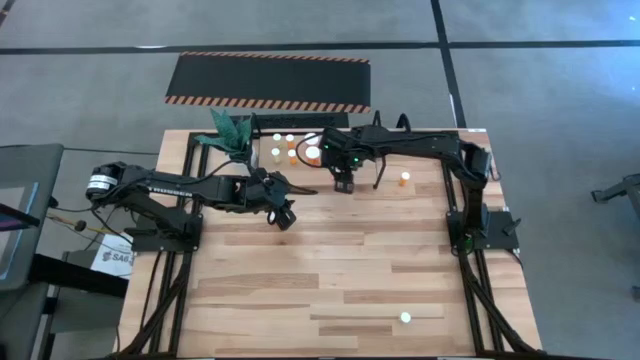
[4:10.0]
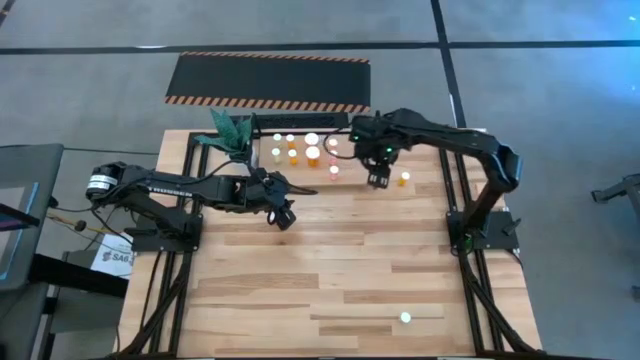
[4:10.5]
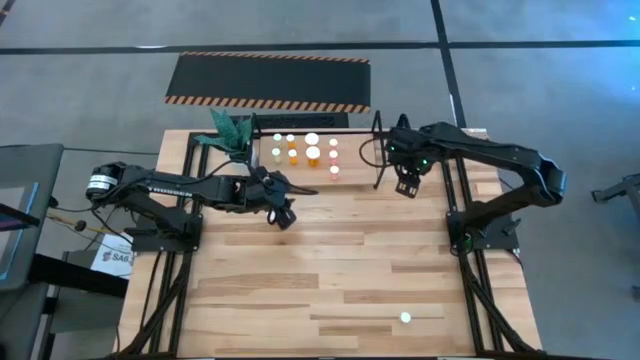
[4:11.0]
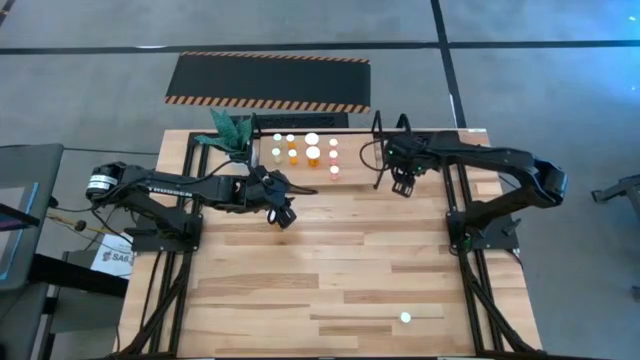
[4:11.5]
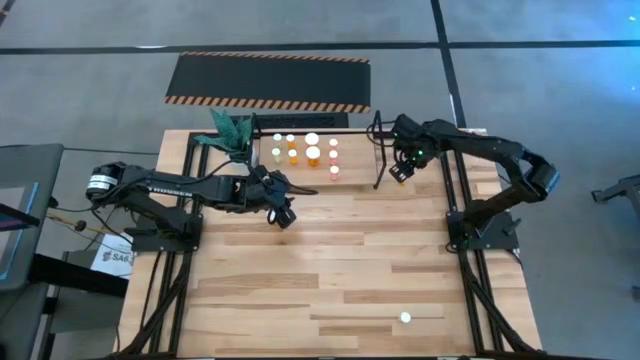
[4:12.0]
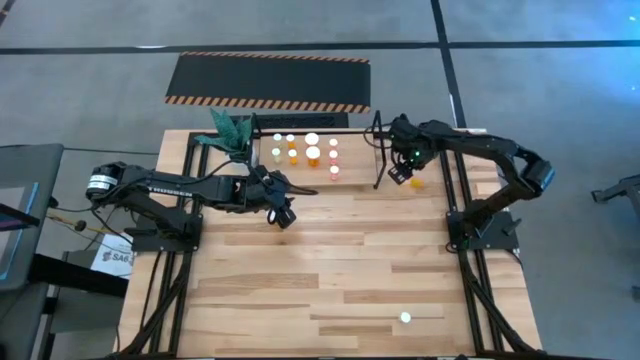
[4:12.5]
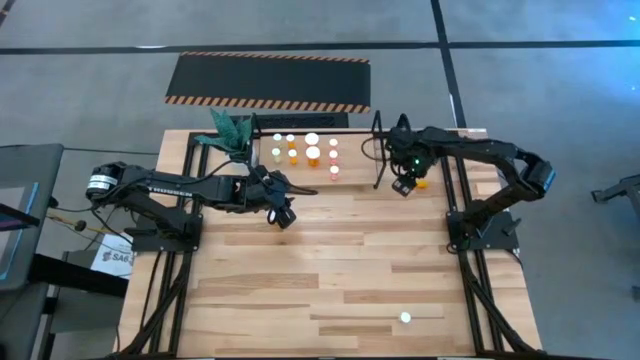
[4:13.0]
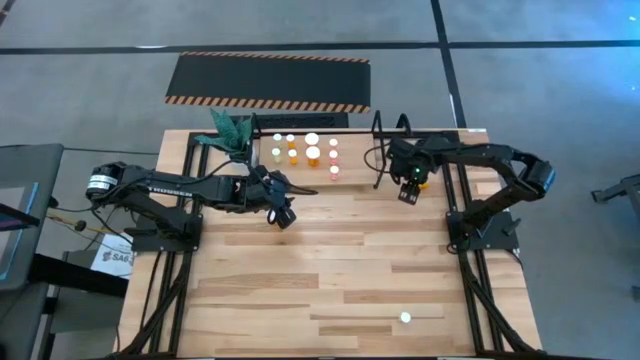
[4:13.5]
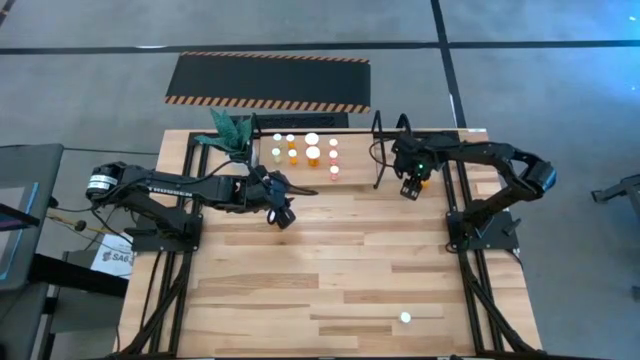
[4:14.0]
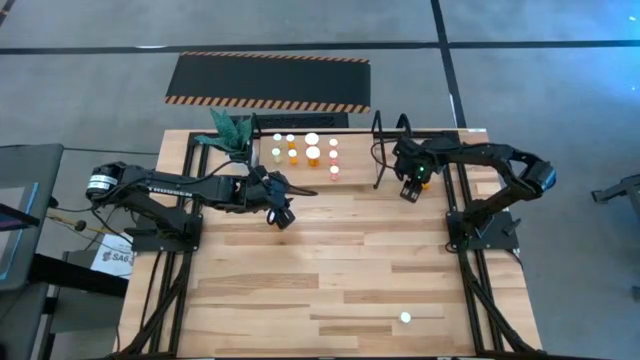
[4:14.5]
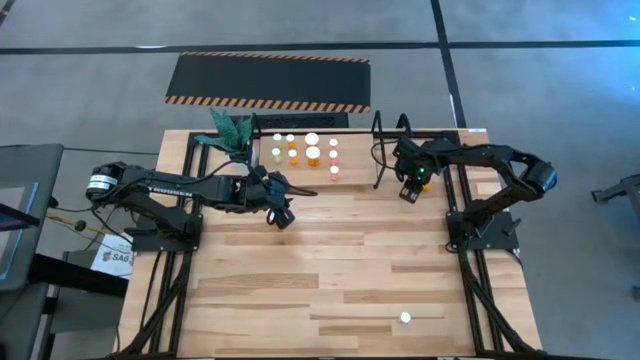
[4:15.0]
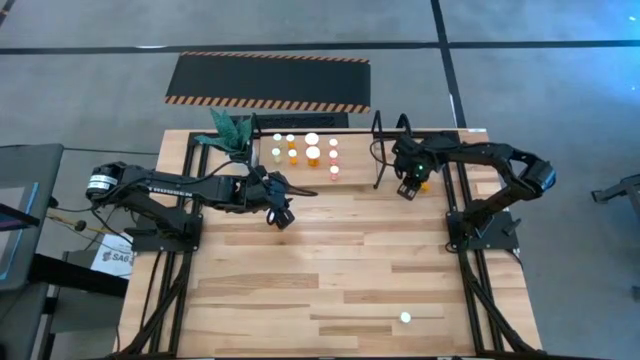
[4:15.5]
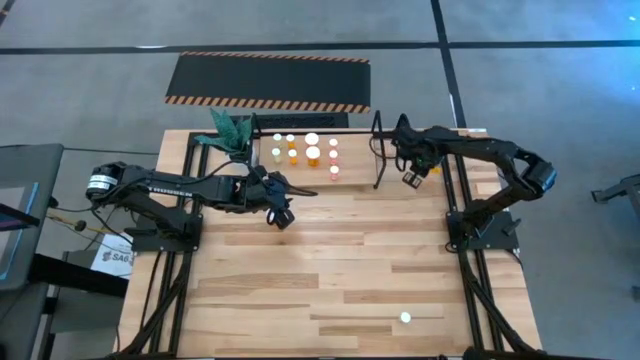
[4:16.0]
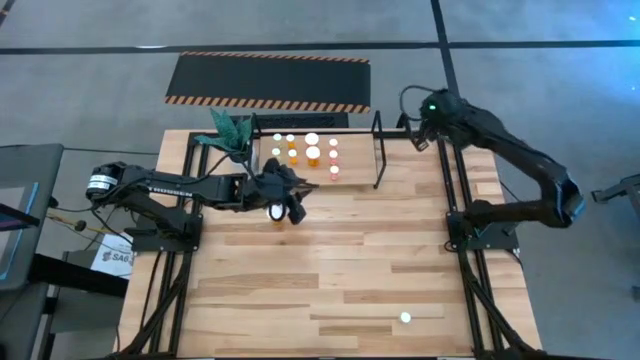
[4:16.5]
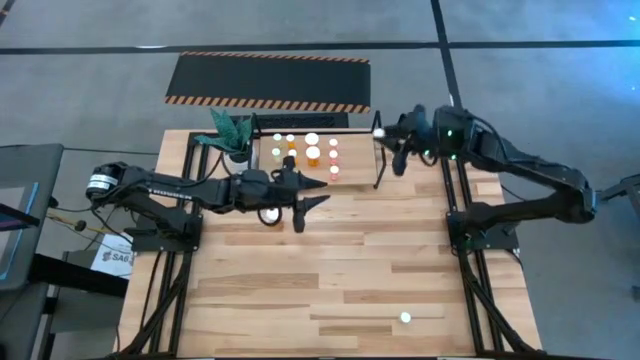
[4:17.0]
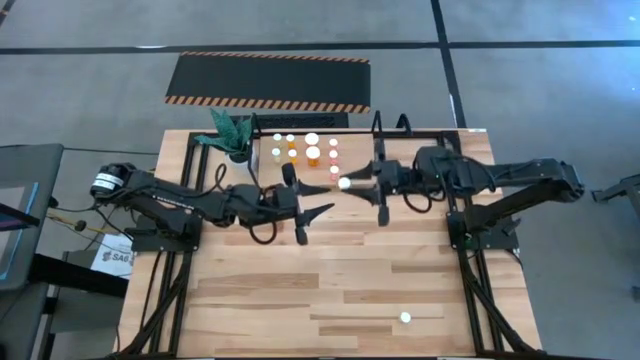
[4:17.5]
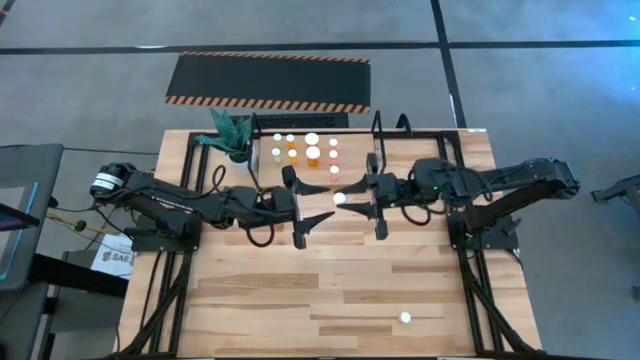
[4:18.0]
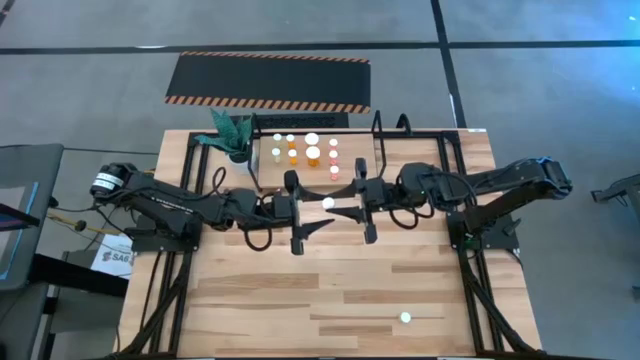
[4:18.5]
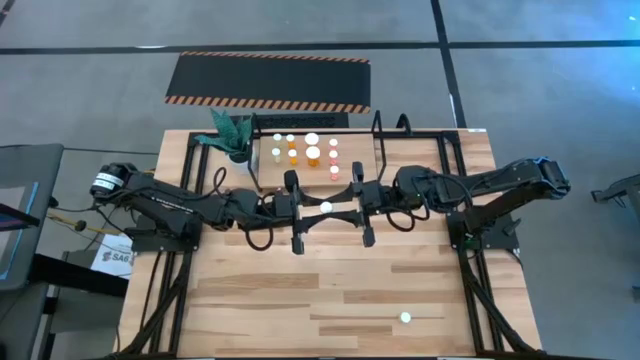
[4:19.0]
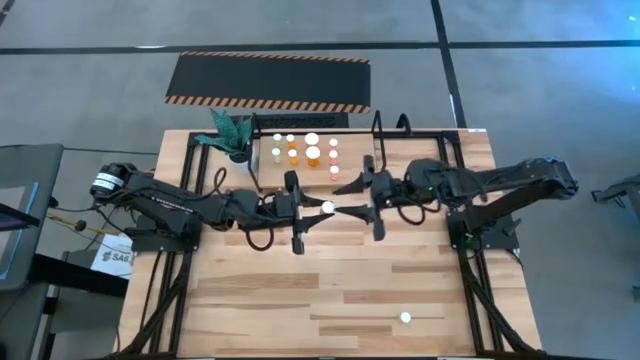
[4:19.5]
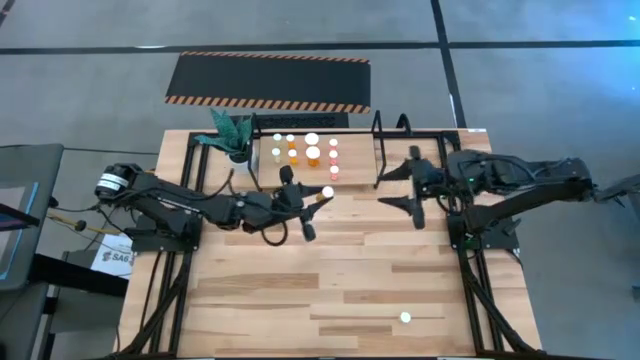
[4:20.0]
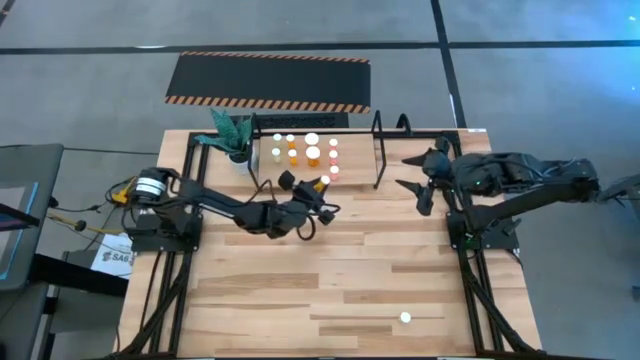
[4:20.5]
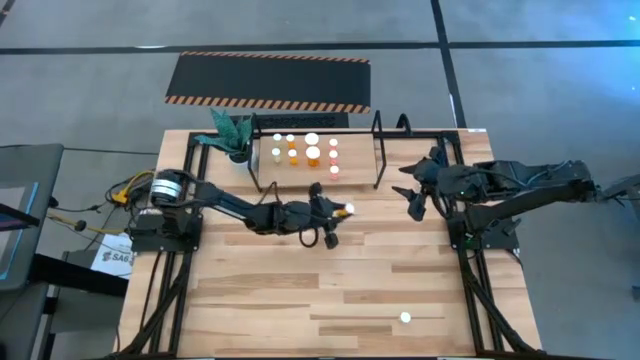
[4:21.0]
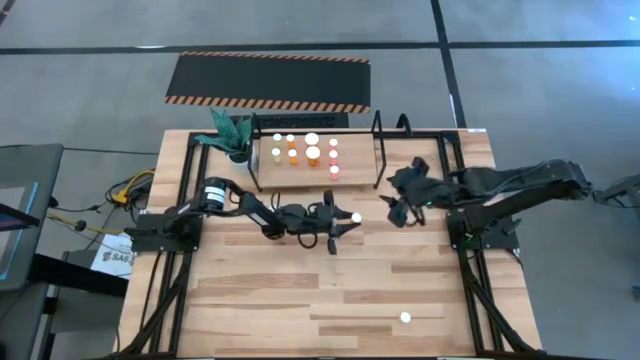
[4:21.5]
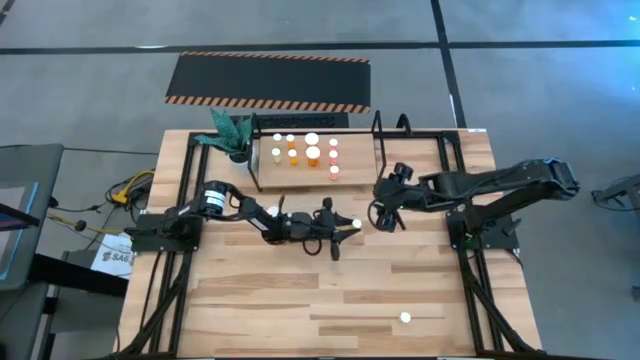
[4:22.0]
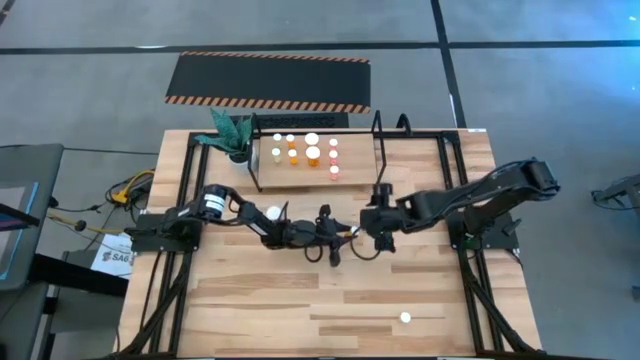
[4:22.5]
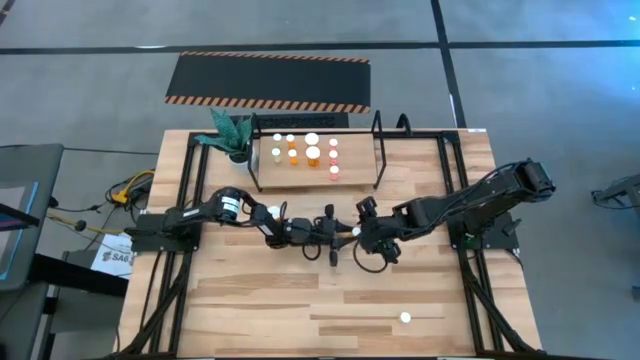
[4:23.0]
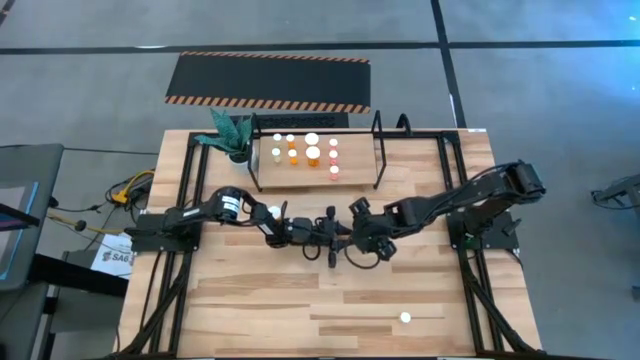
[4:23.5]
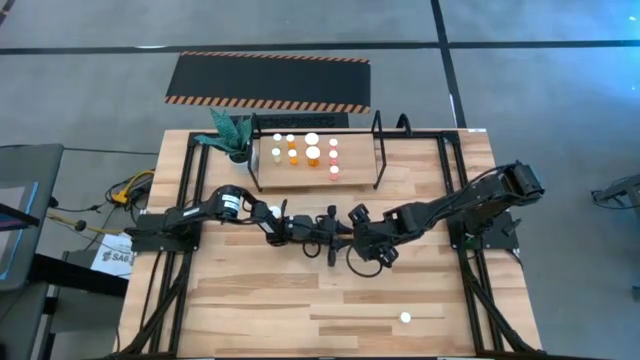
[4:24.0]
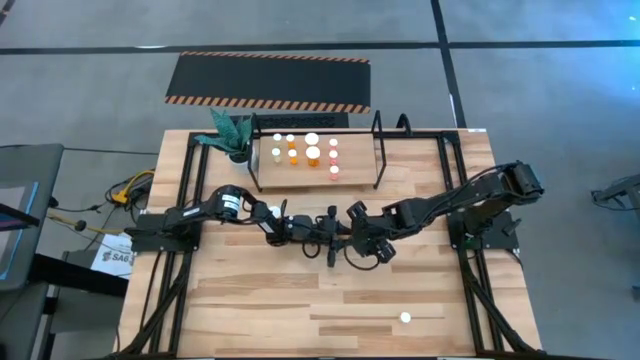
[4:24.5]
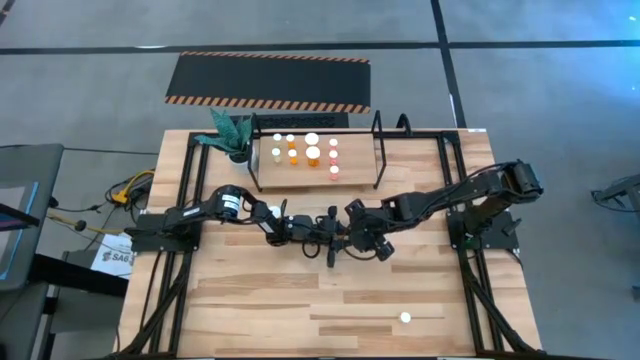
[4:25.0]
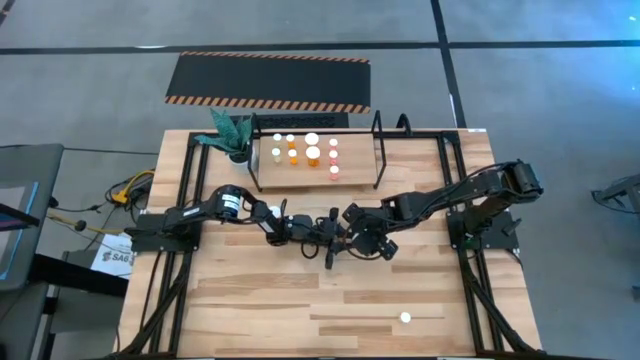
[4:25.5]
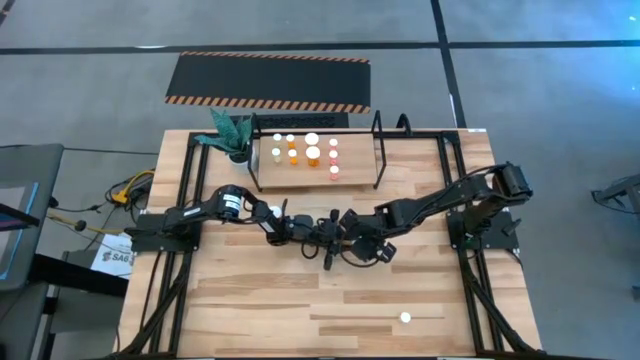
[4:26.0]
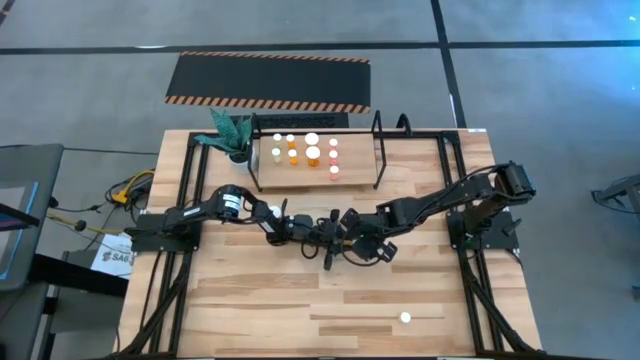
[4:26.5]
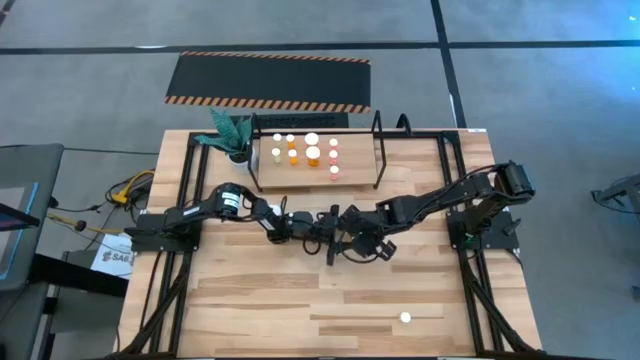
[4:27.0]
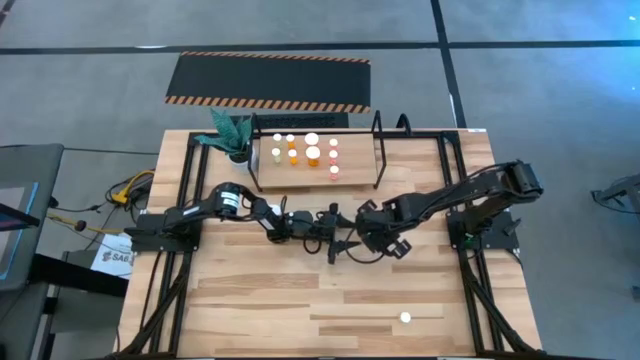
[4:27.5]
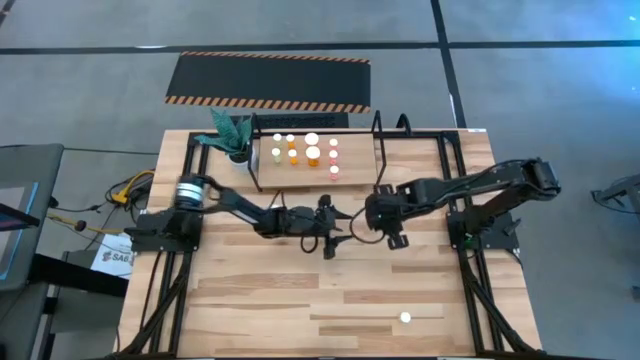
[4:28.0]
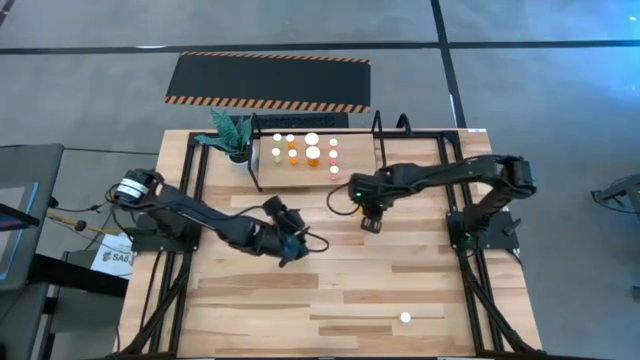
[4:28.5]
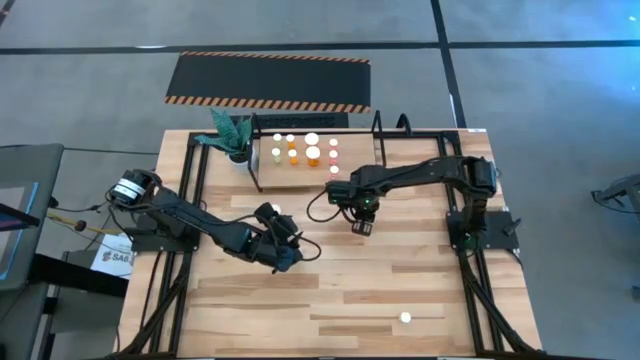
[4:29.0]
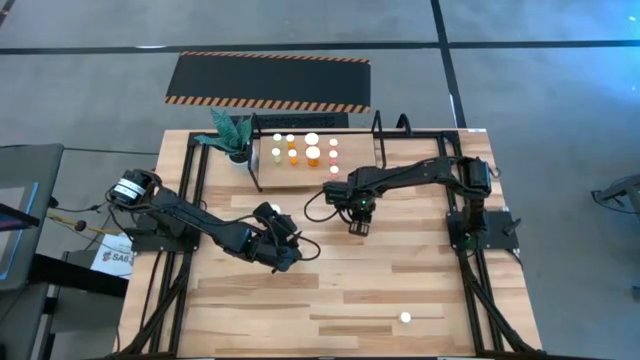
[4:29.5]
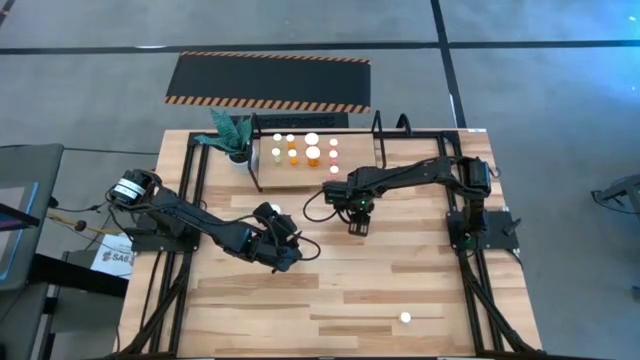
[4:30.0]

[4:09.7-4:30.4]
Task: Pick and place medicine bottles onto shelf by color
Move the small orange pill bottle to the center of the table
